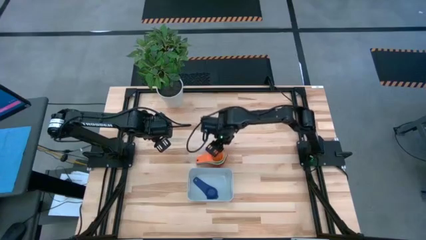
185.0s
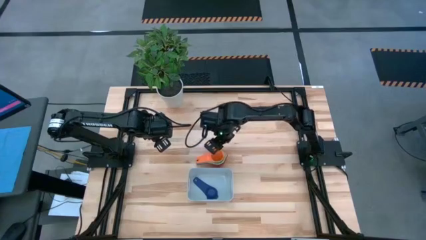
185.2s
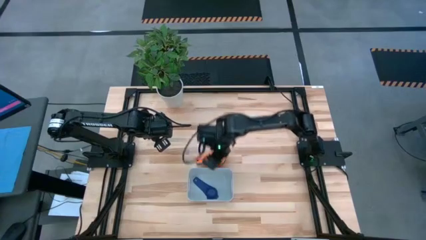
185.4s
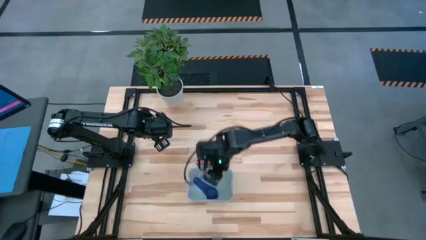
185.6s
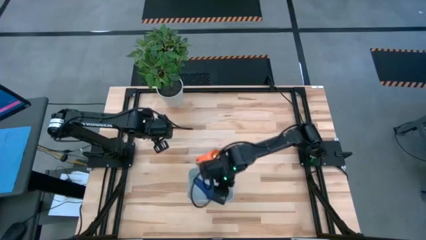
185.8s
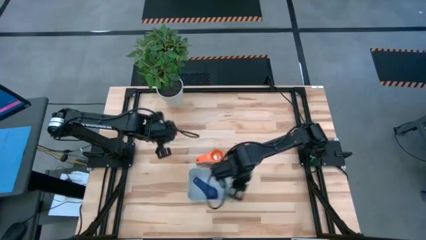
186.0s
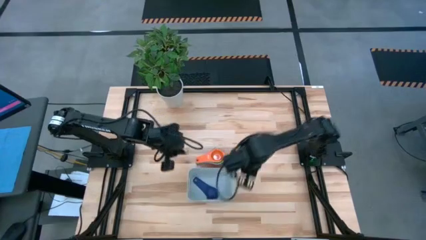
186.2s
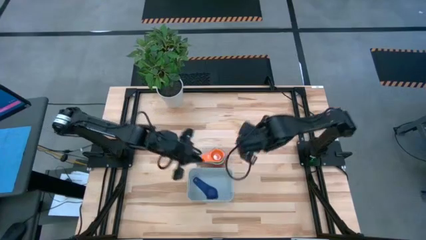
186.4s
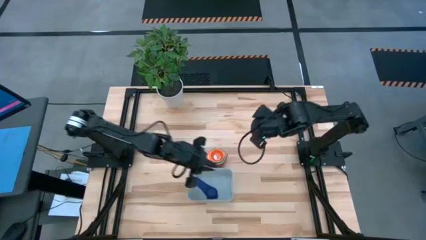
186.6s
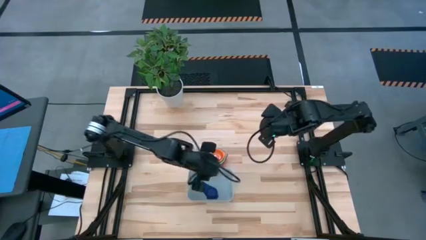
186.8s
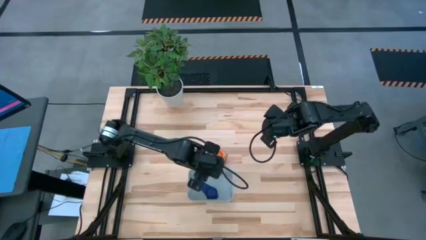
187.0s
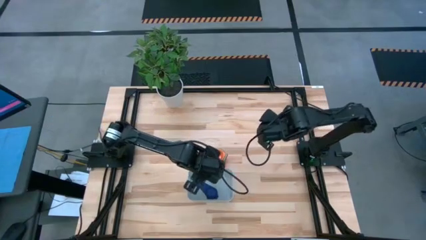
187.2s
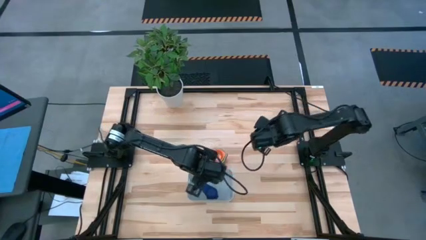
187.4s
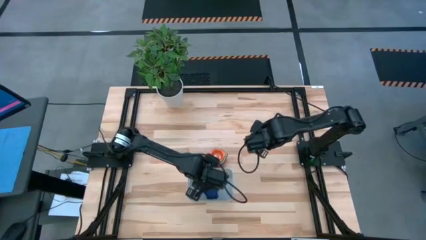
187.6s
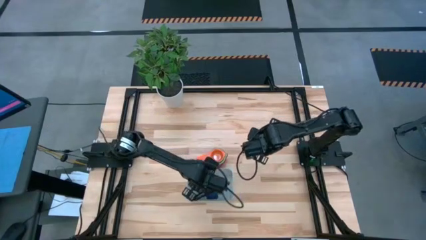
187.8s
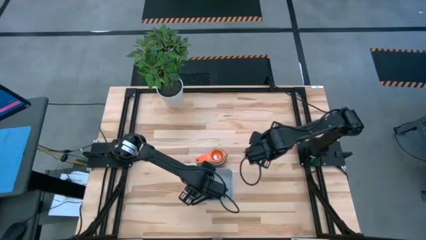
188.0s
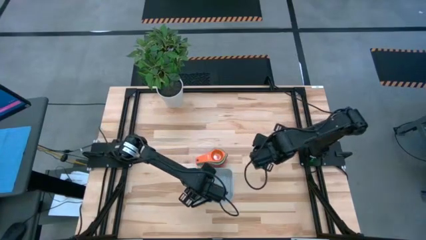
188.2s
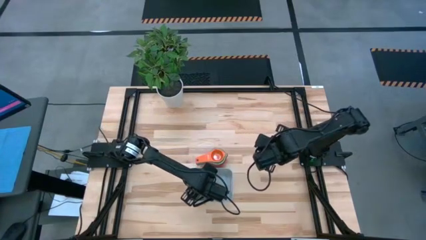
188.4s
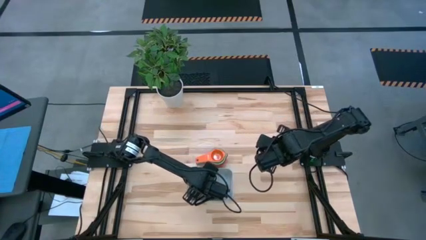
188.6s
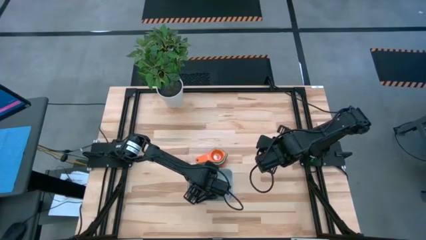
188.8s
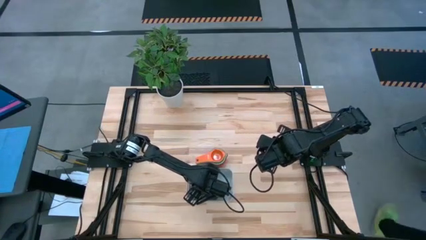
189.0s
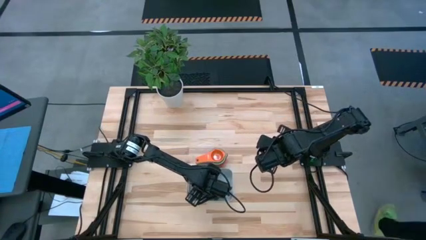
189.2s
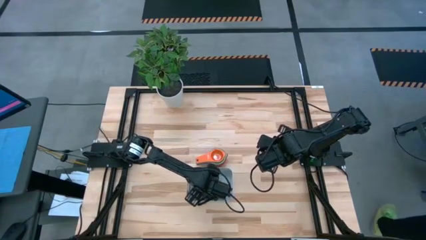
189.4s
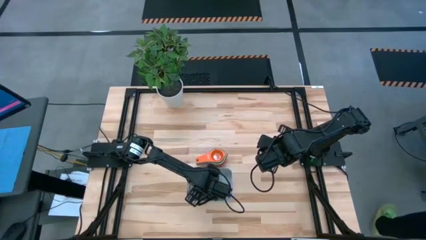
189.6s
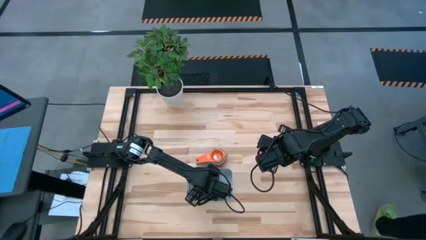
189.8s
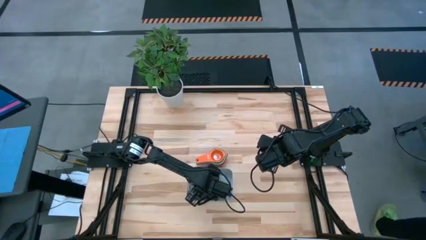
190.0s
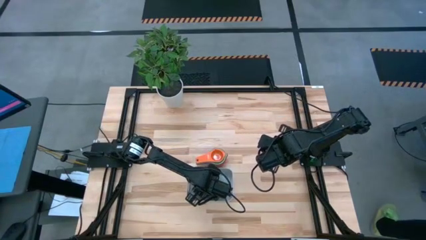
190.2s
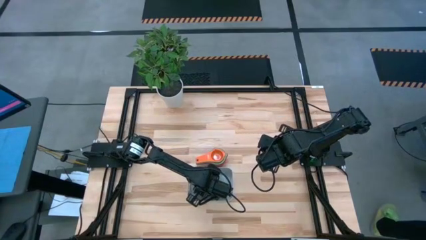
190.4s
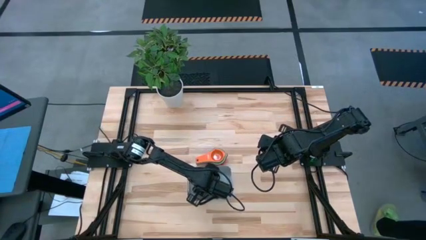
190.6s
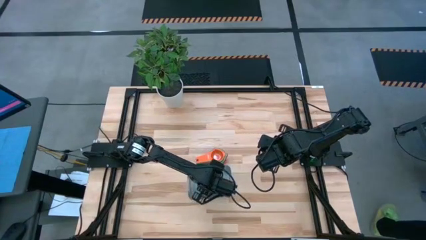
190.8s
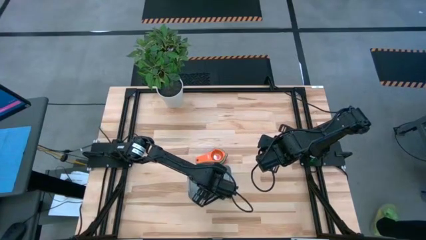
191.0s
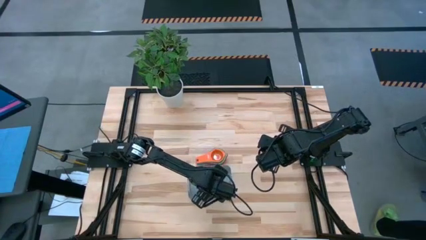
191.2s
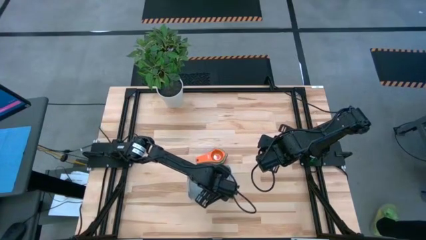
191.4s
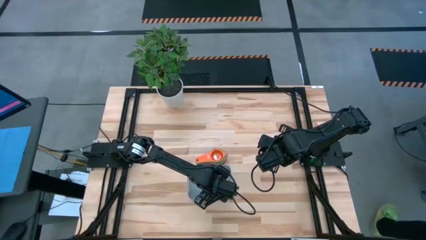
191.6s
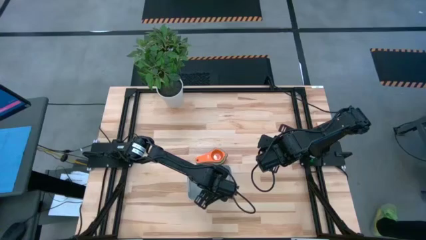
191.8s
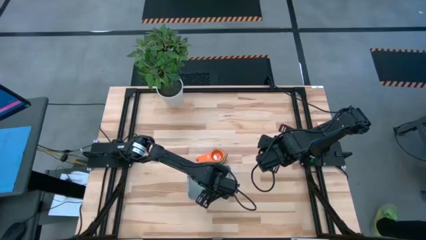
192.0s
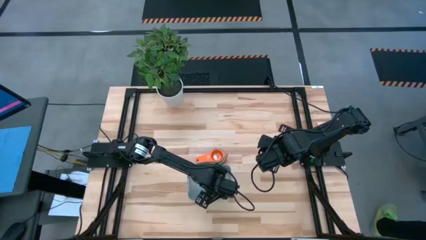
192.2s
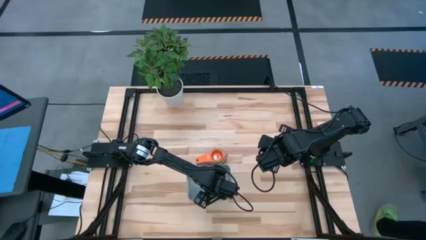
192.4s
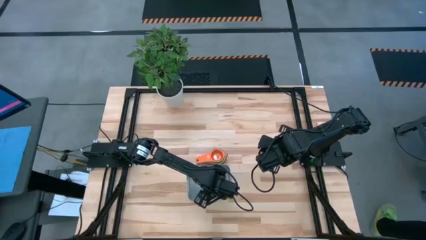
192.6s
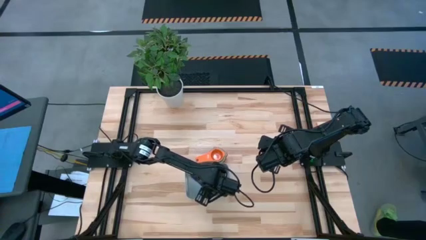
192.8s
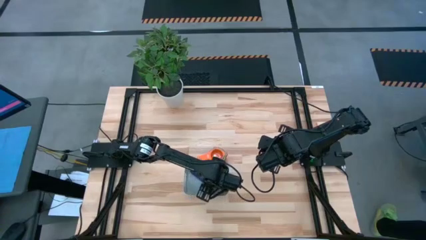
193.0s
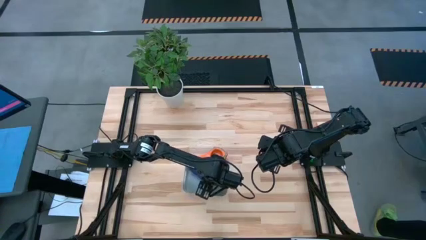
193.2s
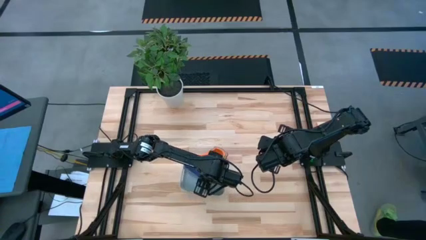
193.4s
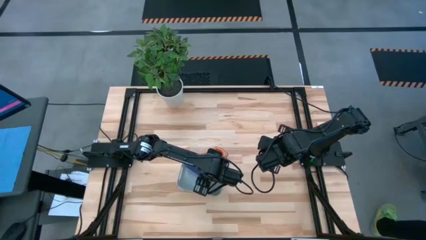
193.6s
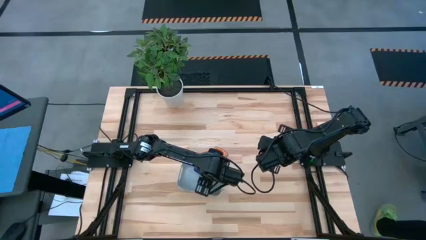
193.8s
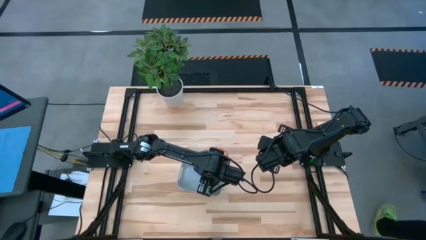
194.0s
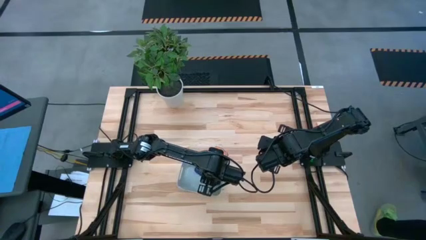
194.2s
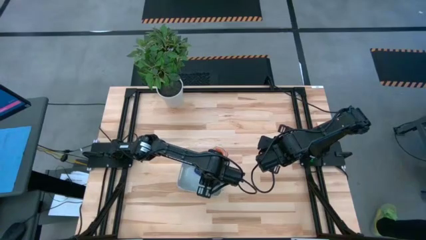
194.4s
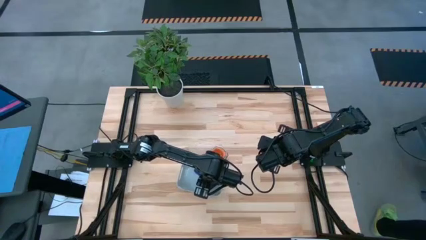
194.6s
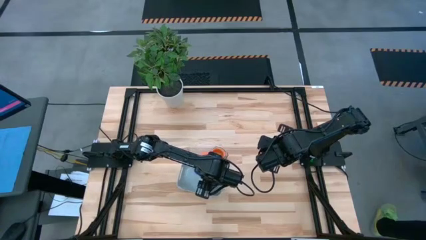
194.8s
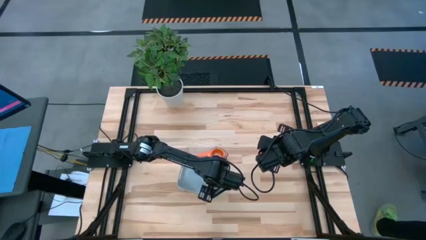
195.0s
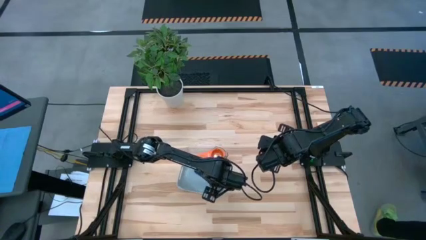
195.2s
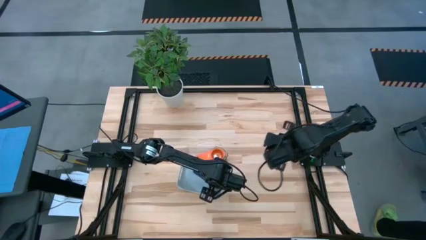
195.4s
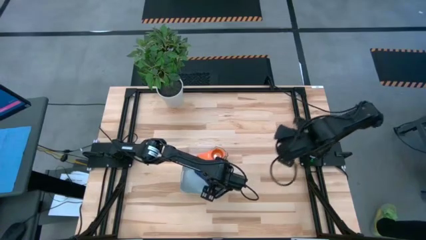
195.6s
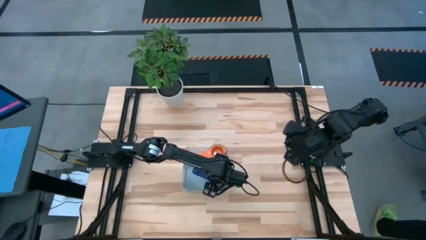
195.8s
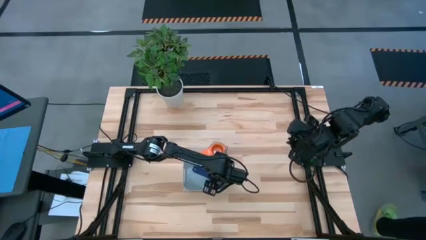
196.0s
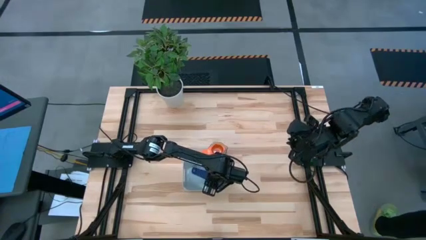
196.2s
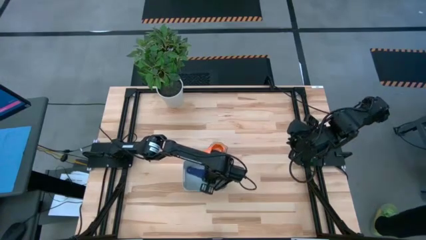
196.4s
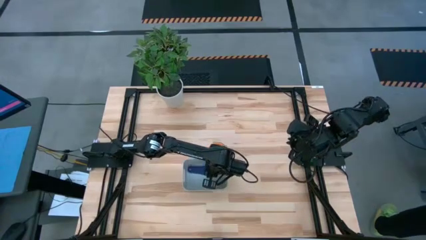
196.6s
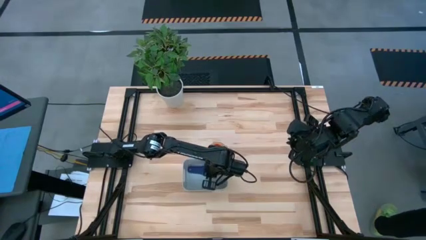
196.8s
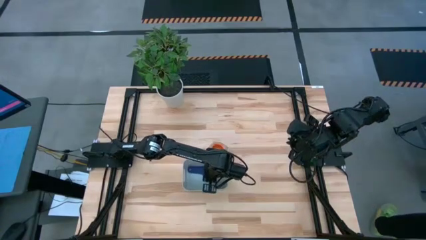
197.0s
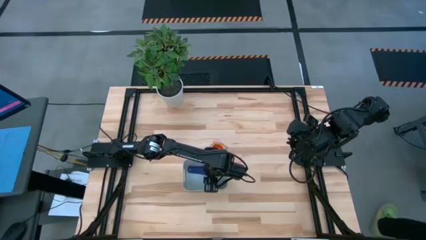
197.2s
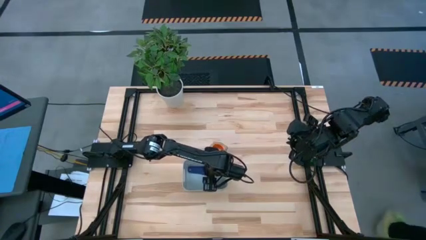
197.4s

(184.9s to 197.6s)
Task: Nest measuring cups in basket
Remove the dark blue measuring cup from the gray bin

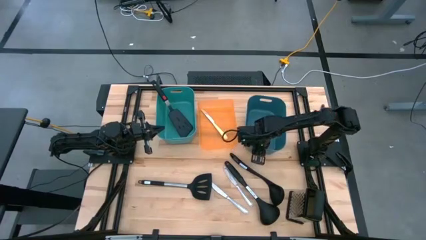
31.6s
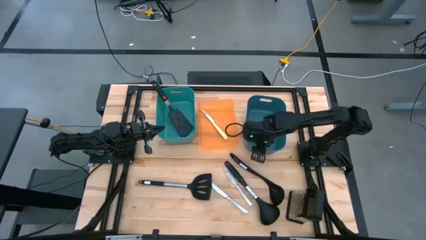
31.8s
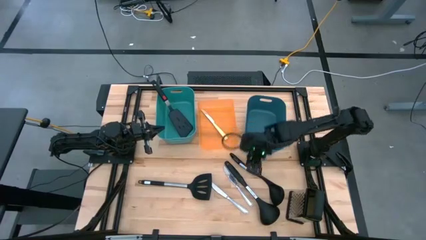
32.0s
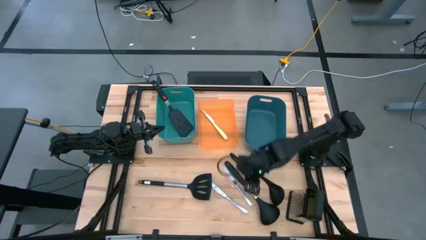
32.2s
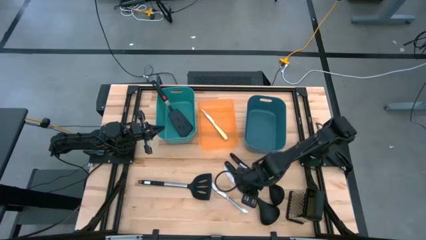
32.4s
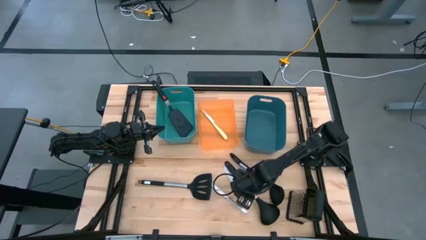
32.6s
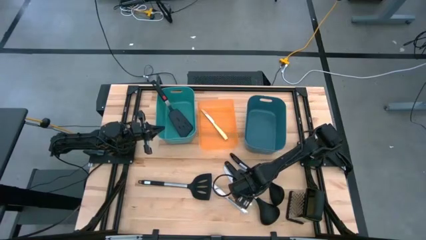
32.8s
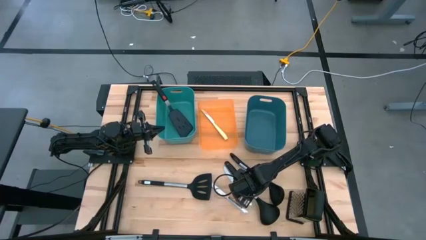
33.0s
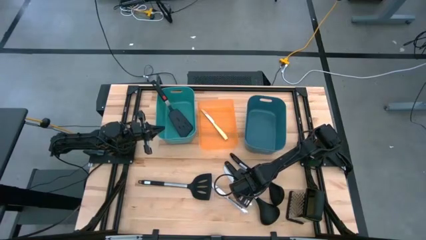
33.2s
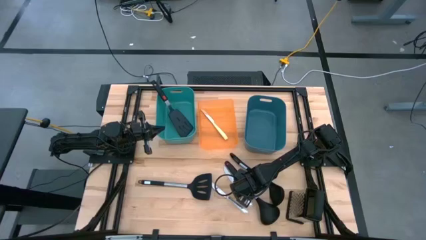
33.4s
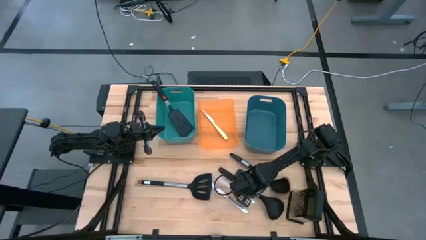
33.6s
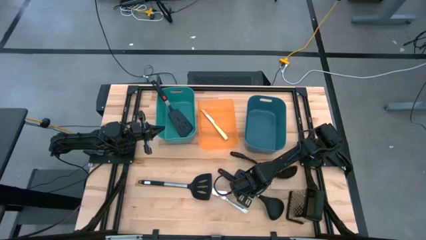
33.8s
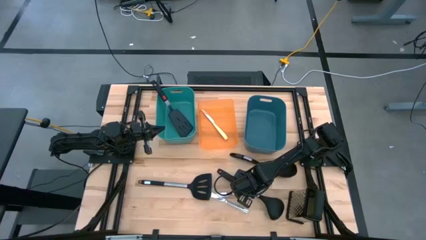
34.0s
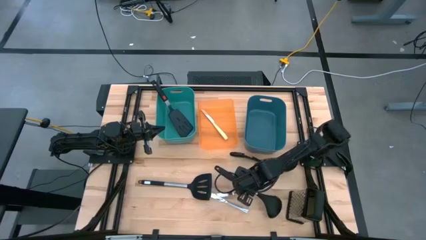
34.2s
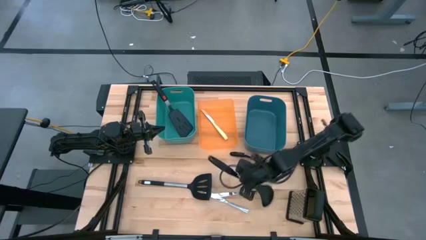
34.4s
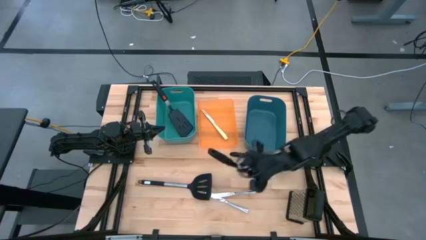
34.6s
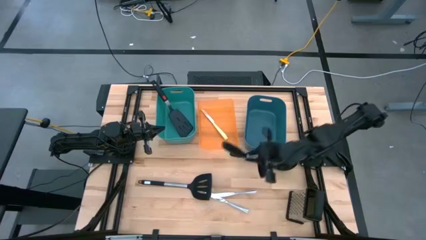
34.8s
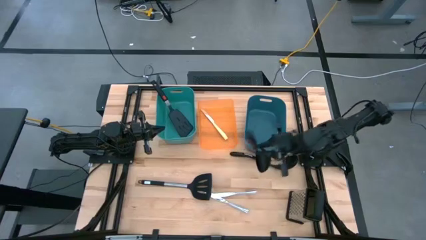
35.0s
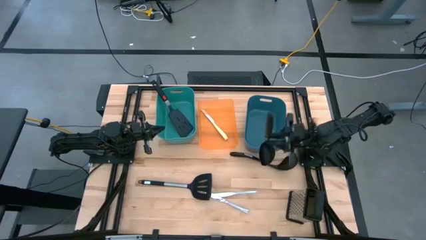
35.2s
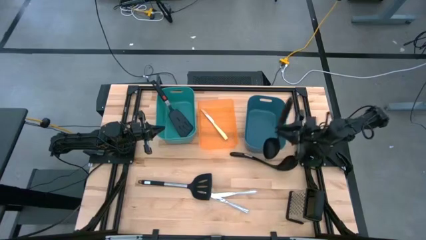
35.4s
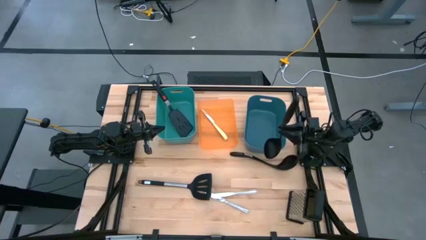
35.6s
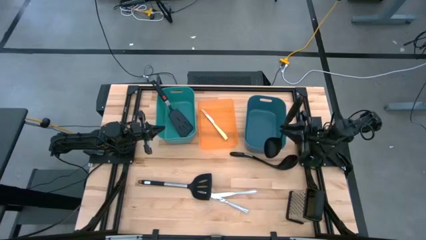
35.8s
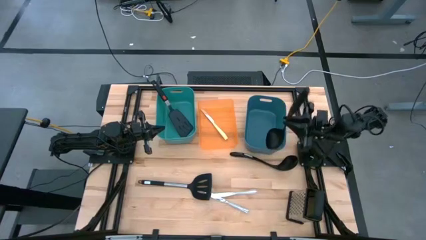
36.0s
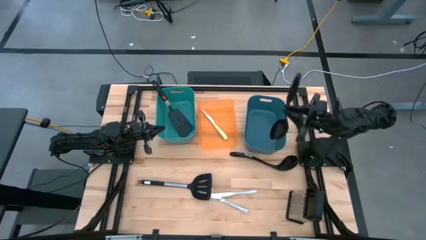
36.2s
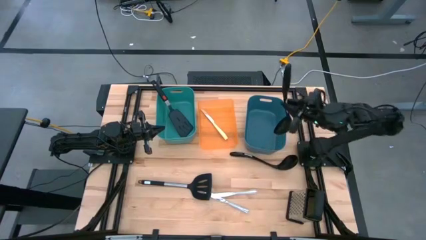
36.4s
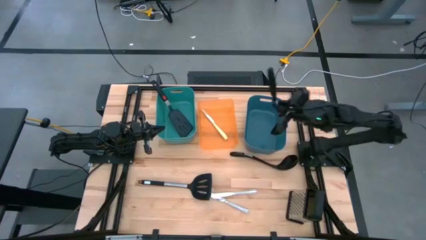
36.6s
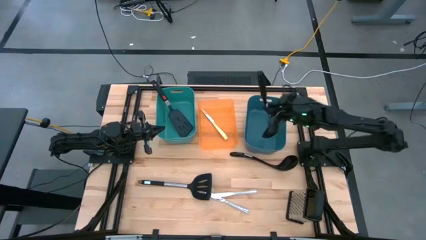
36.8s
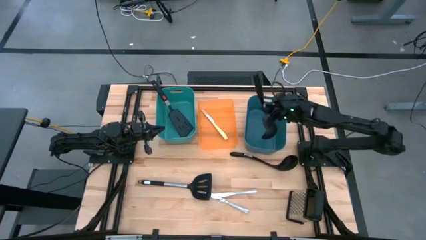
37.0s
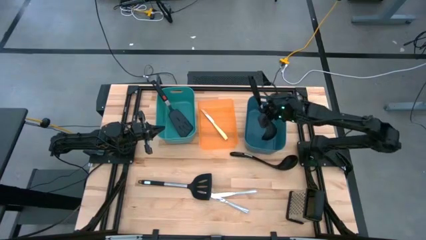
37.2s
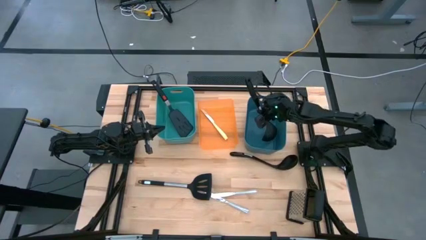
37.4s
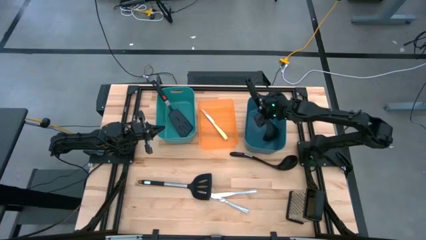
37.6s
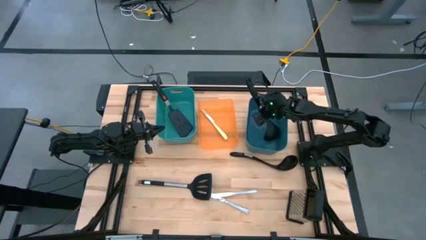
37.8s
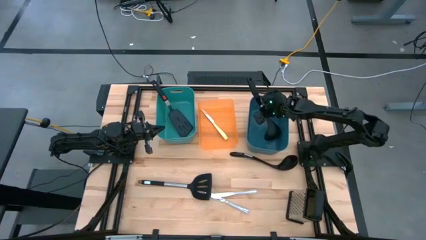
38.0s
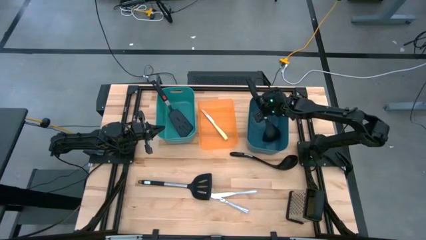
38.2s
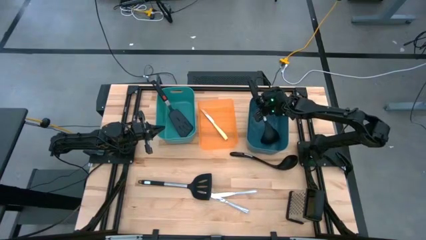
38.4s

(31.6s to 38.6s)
Task: Pick & Place Kitchen Items
Put the bottom black serving spoon into the dark blue bin
